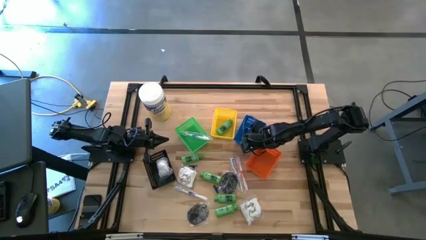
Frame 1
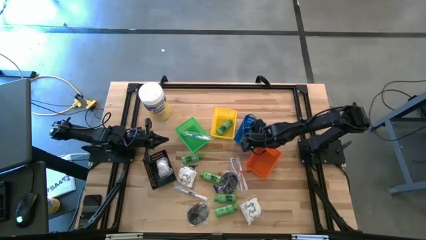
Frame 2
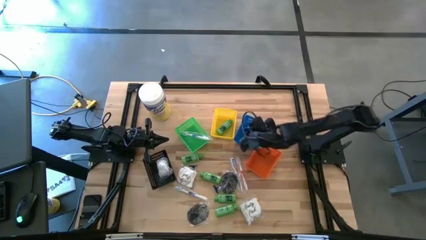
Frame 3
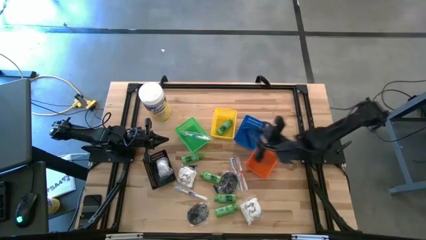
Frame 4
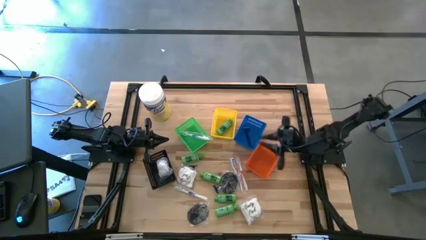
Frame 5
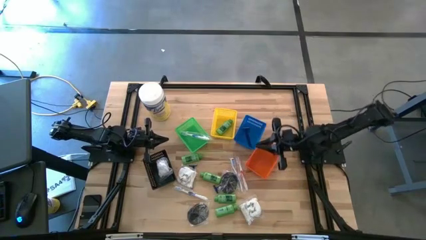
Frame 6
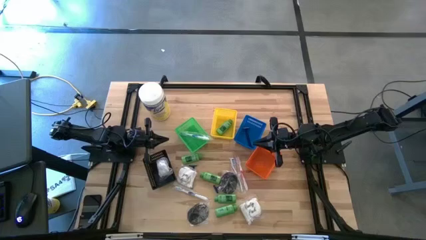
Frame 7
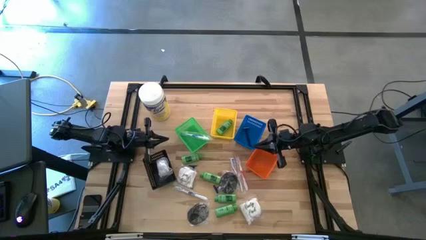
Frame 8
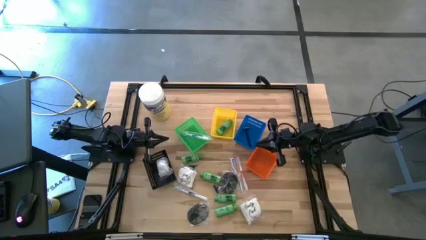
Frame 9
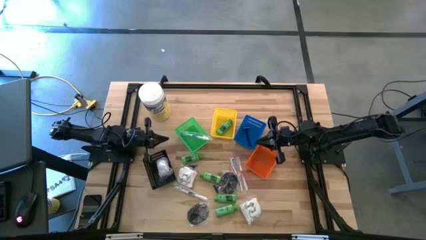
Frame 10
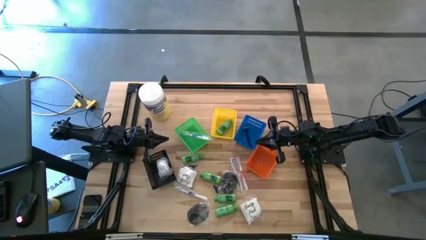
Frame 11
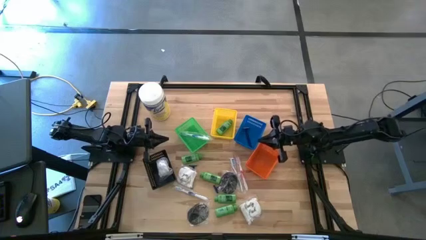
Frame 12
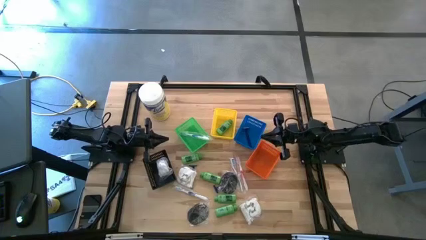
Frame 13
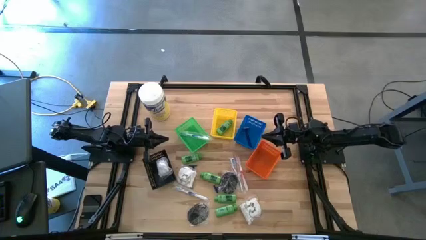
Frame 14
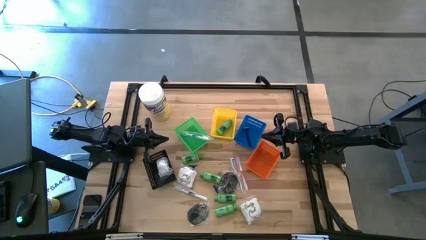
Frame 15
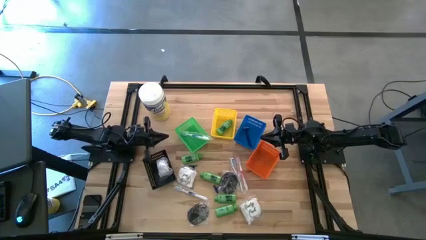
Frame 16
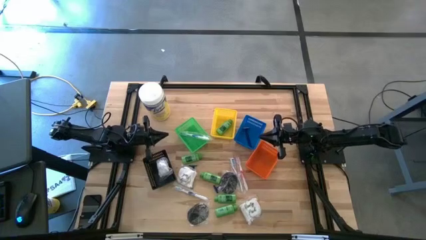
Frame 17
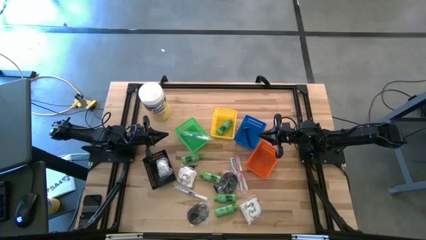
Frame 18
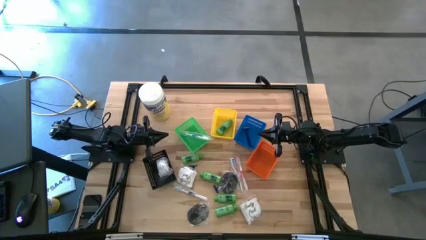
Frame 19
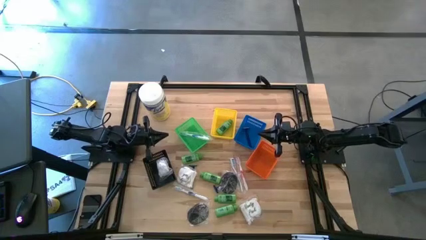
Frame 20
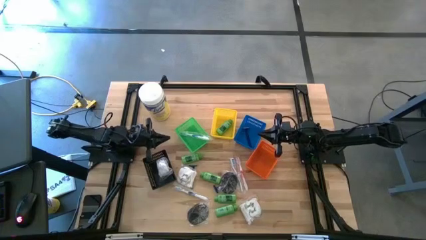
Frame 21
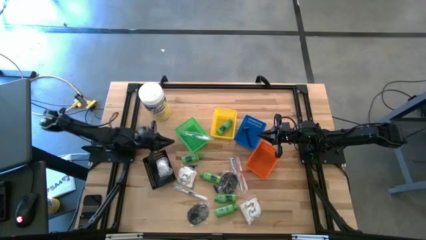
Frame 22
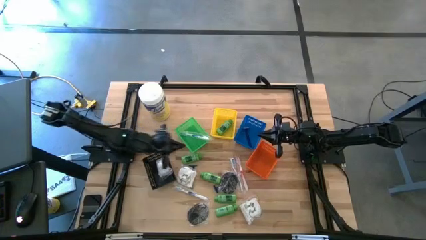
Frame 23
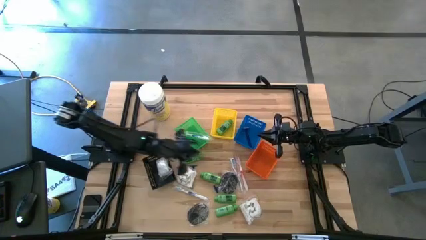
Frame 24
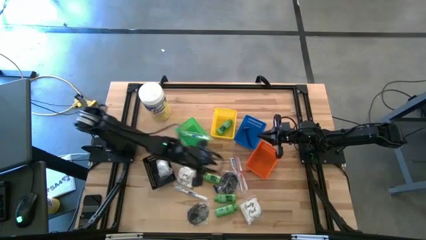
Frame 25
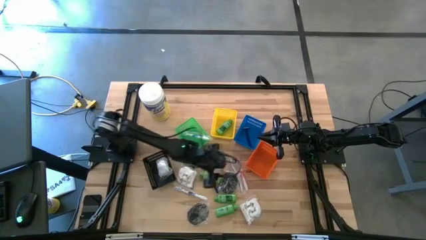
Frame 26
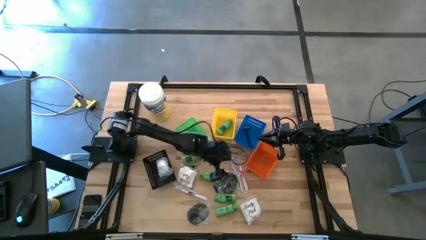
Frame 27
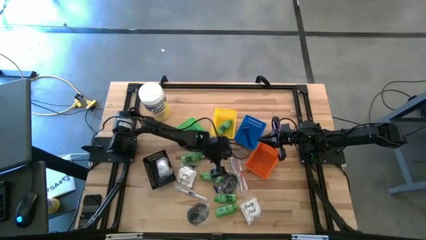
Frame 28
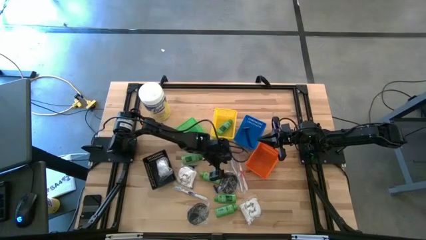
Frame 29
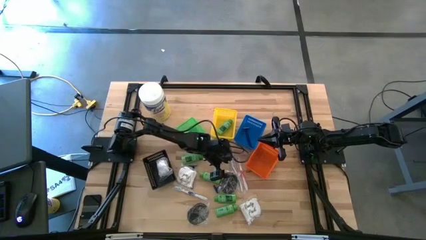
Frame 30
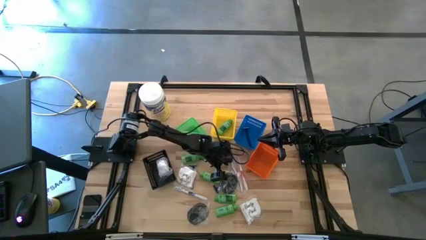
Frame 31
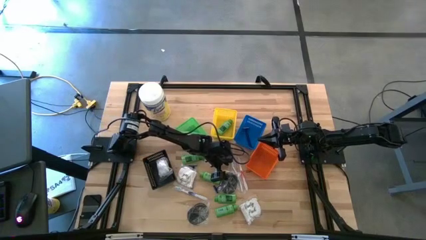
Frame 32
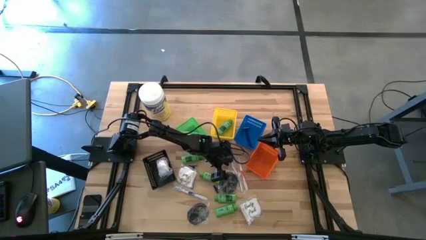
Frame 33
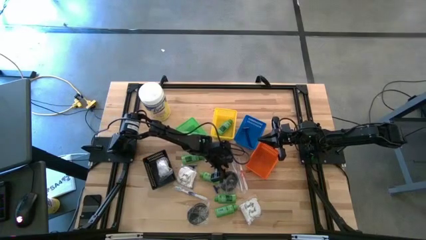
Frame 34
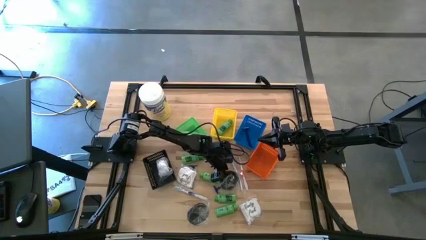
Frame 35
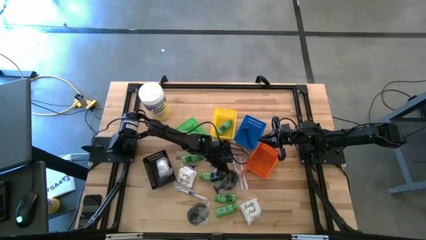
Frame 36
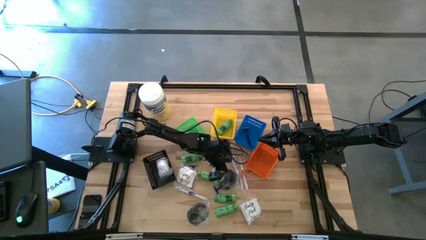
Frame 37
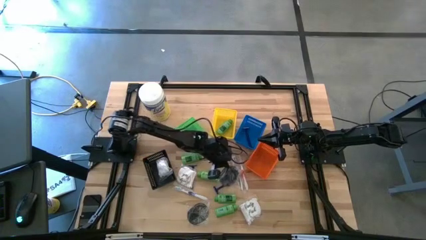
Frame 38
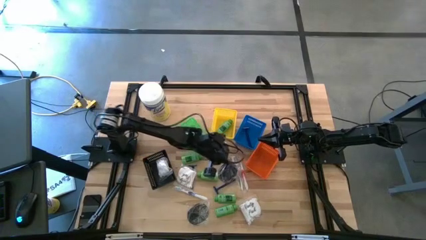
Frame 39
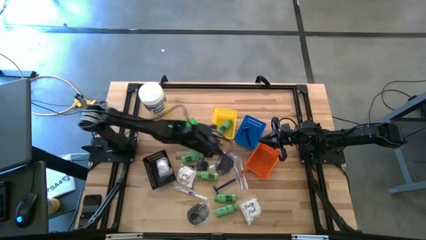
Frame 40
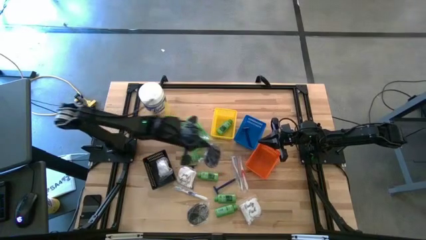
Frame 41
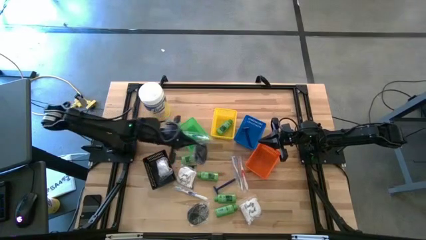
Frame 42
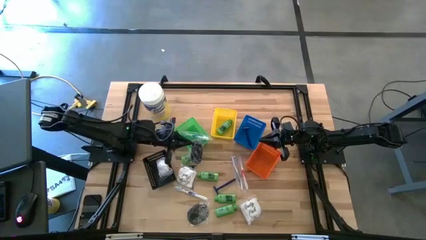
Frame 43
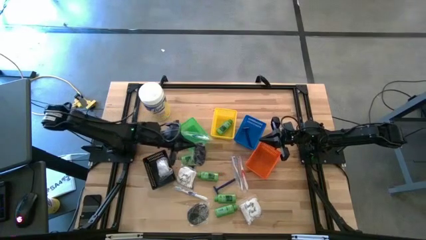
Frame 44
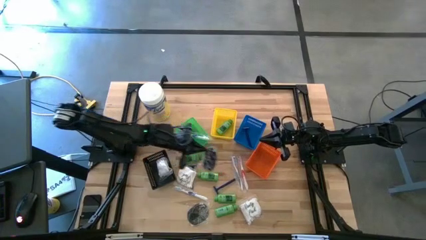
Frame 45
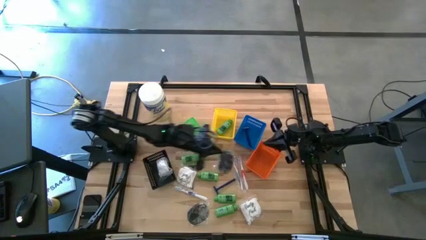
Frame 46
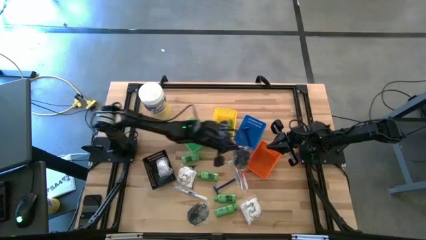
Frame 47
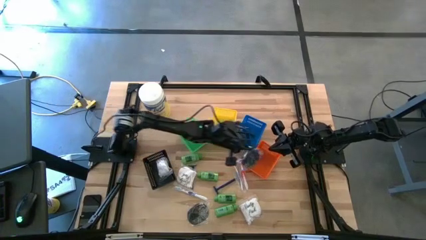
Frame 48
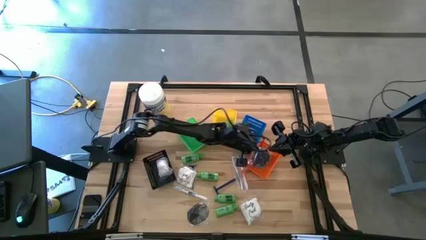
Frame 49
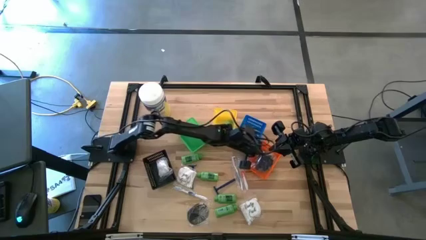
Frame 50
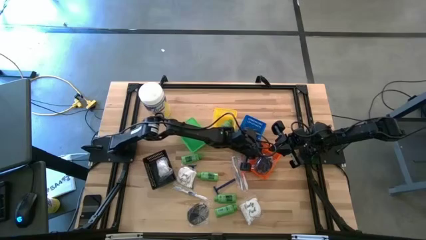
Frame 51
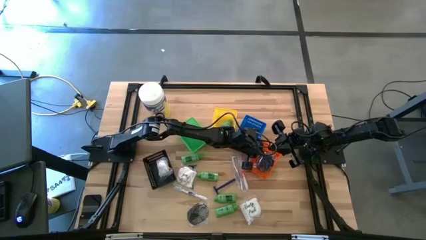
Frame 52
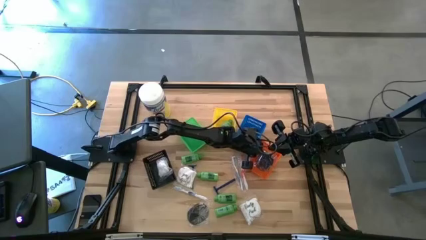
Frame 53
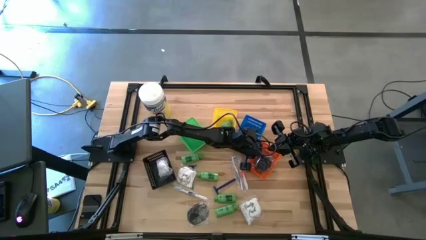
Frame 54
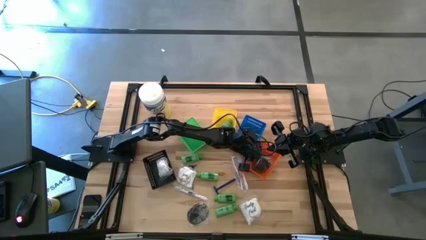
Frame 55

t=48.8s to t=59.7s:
Task: Pick & Place Travel size toiletries
Put the hairbrush into the orange bin

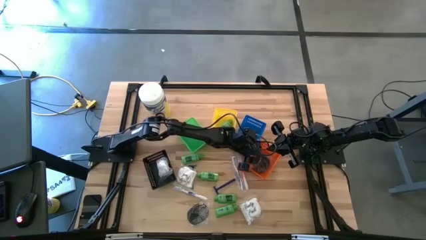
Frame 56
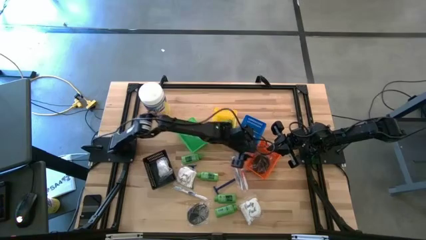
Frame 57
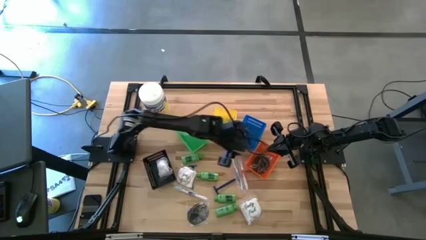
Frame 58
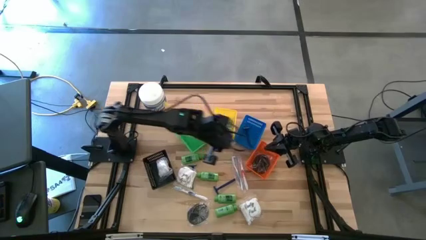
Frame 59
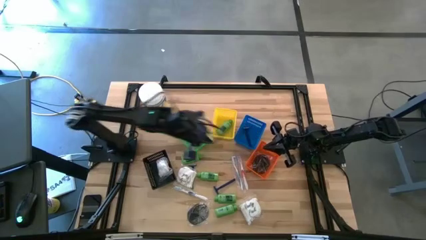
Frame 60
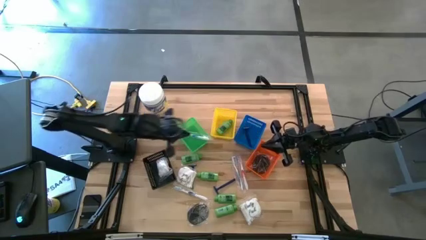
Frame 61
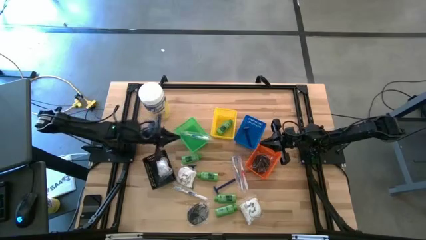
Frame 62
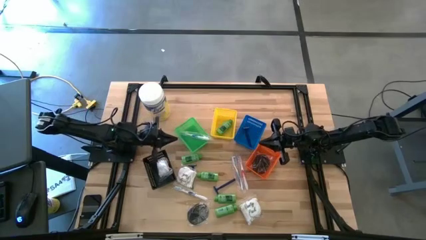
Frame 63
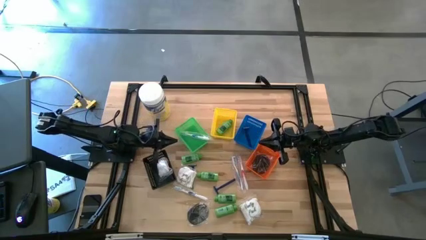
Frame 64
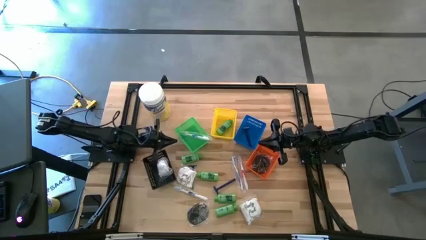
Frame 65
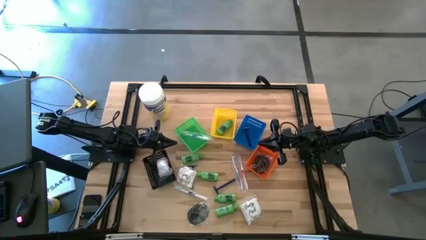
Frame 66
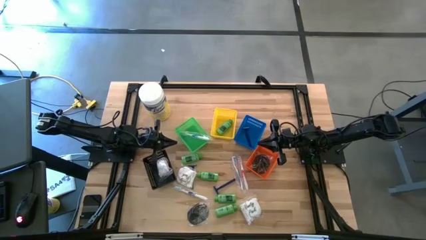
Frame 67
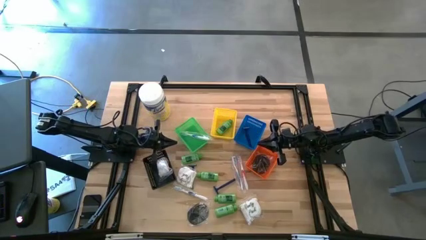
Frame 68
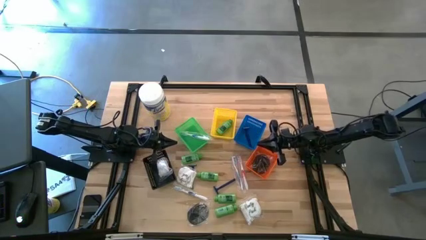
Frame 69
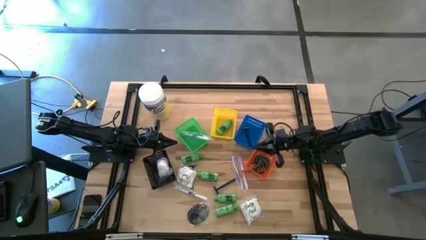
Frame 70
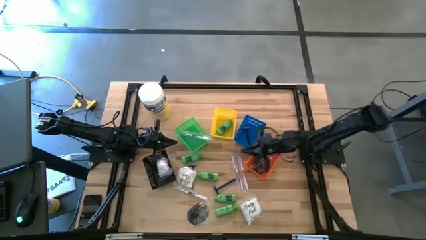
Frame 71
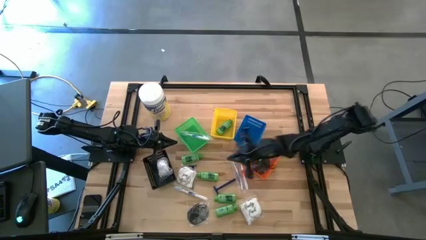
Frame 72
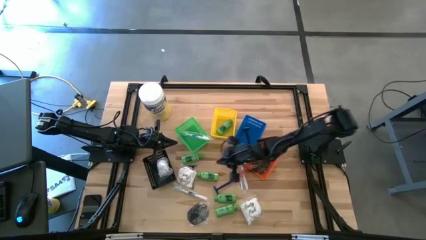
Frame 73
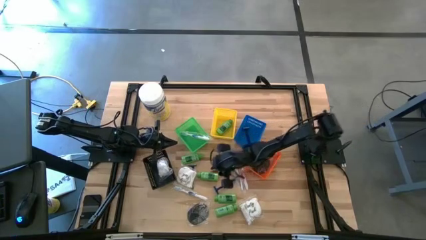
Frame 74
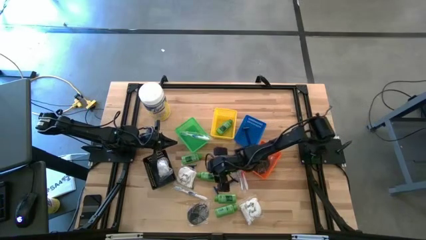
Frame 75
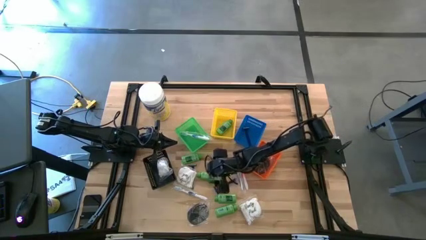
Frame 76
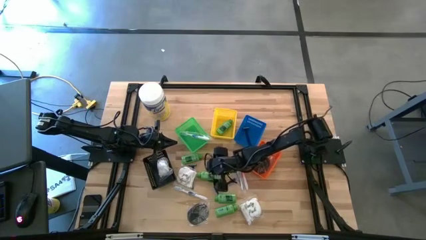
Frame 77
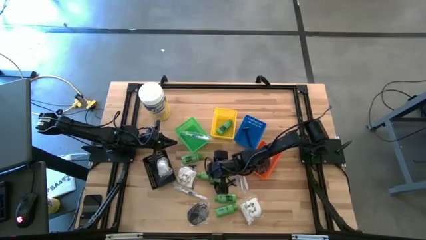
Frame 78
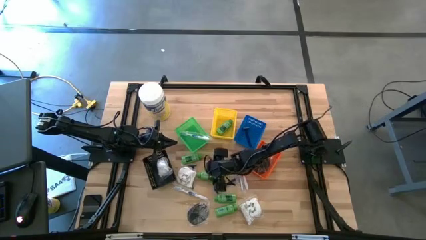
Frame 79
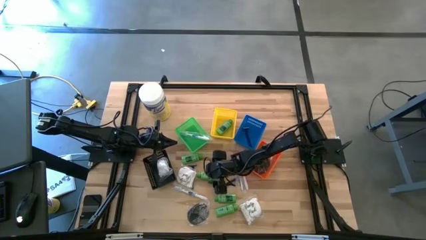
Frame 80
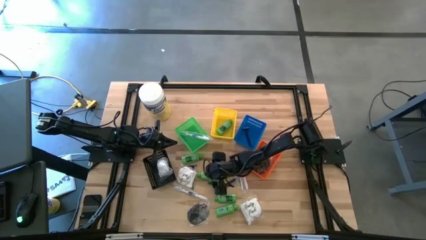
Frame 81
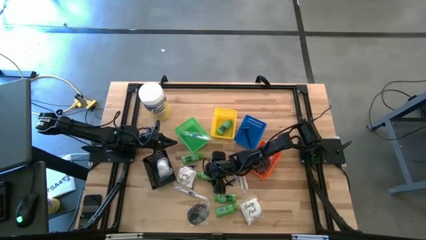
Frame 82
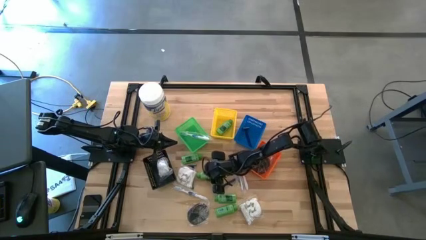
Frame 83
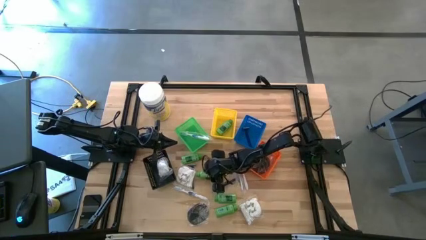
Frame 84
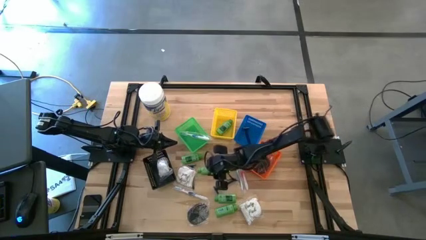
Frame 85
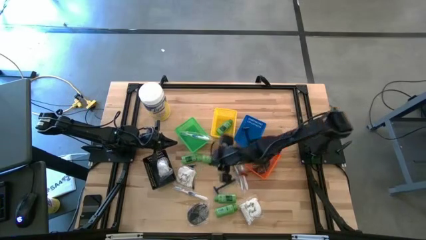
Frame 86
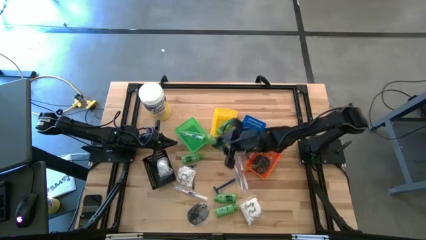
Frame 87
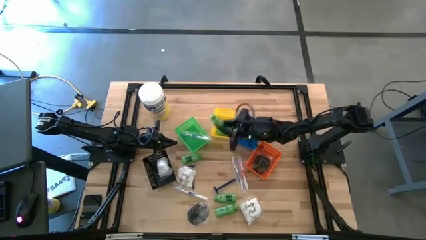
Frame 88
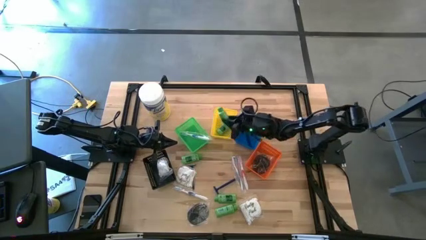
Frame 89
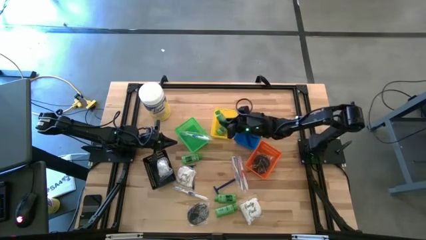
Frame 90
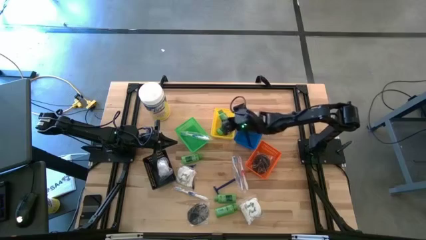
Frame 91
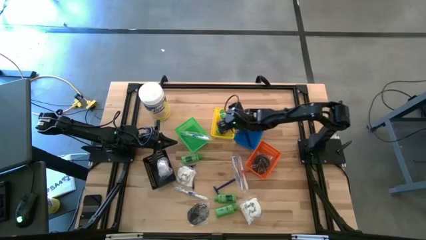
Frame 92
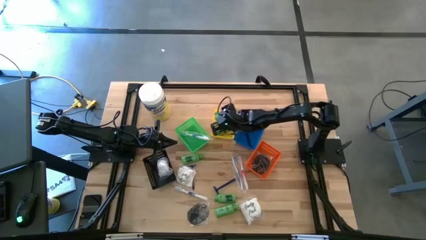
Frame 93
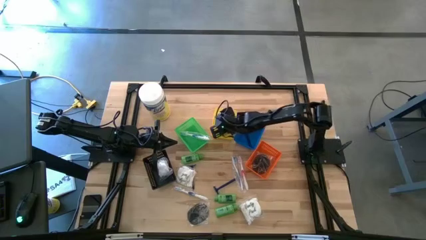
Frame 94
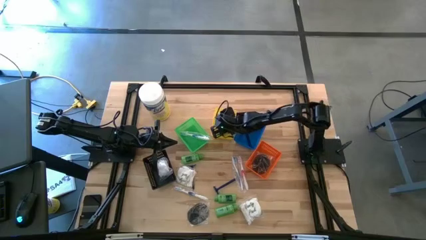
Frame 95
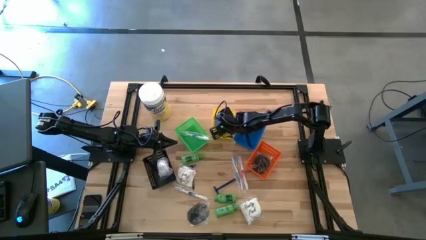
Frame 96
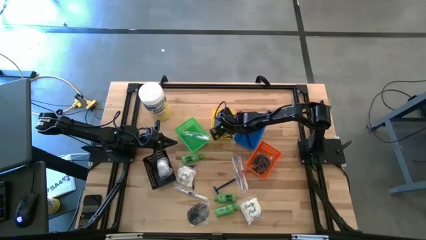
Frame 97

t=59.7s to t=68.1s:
Put the shampoo bottle into the yellow bin
